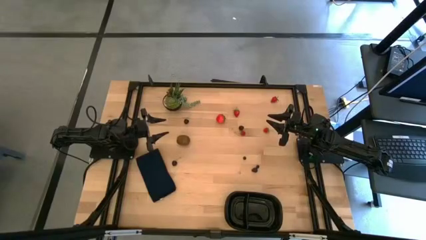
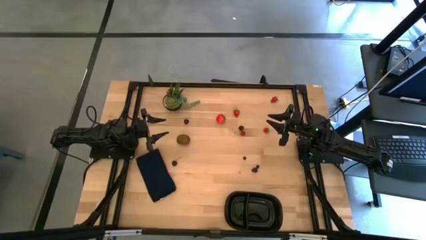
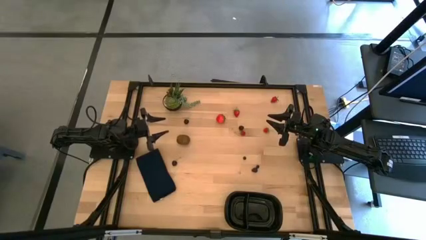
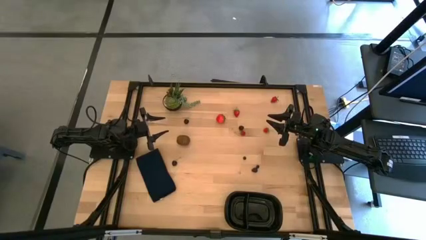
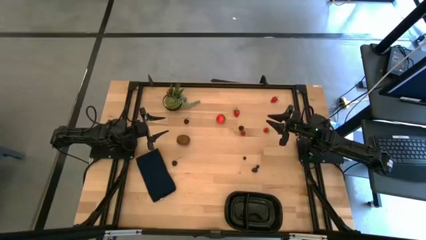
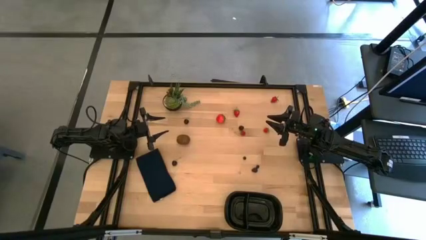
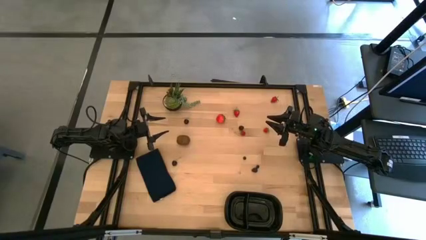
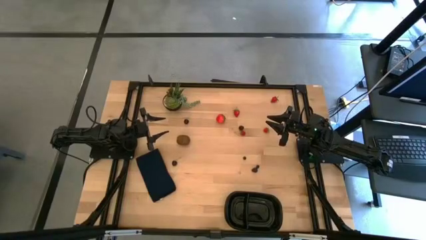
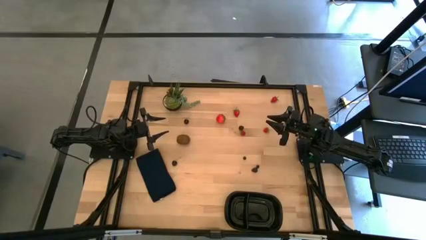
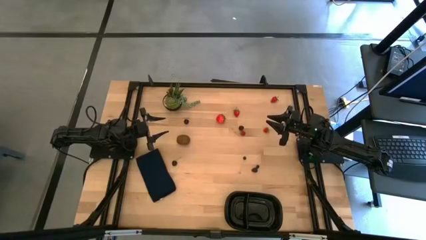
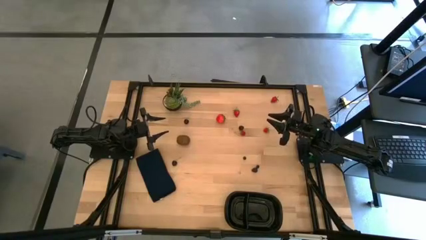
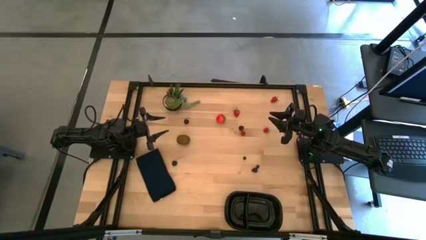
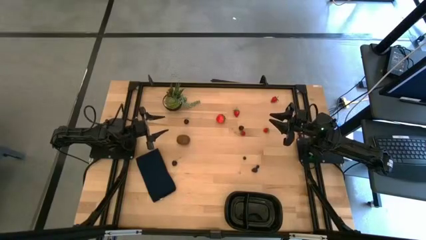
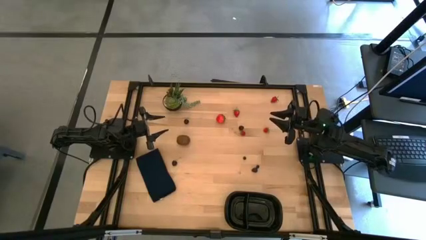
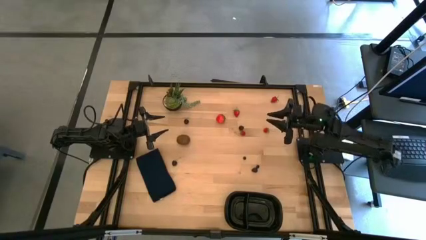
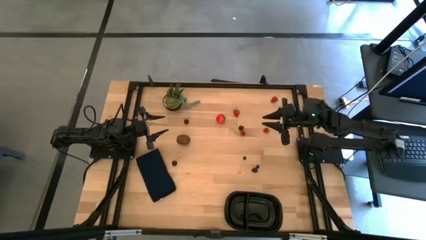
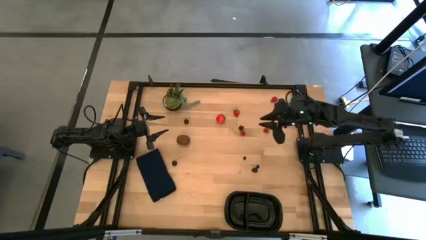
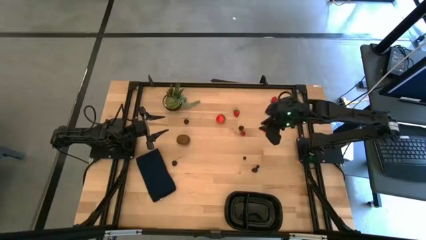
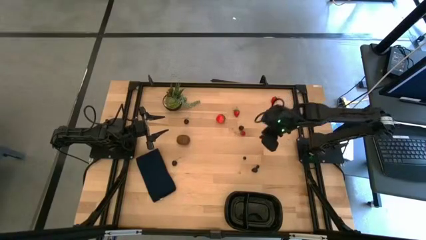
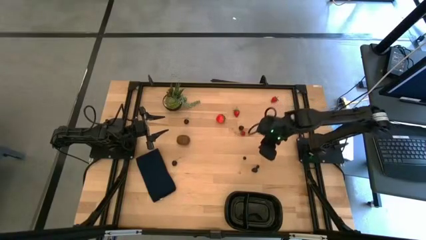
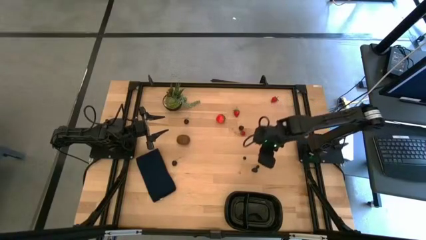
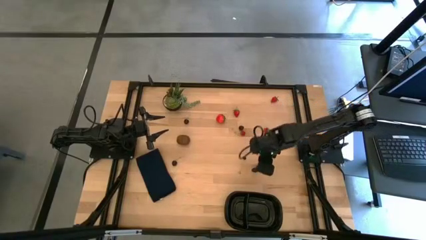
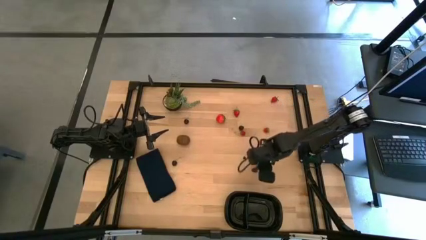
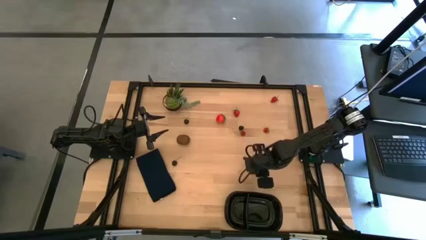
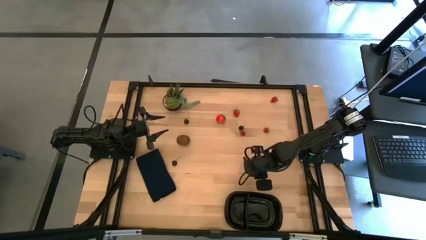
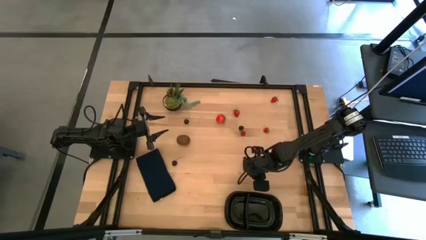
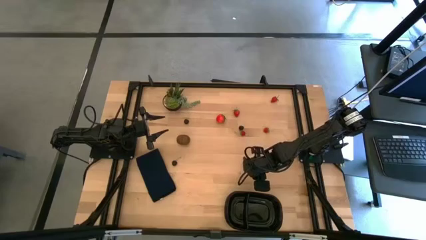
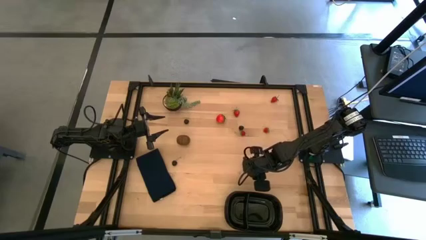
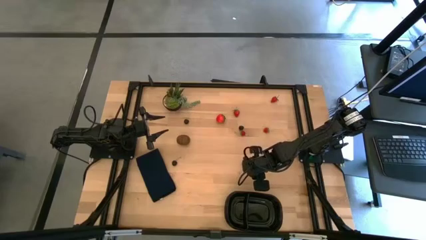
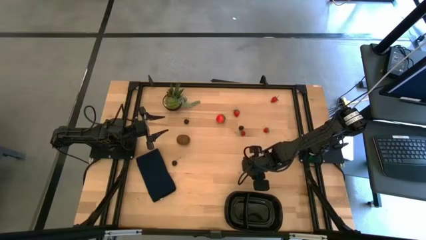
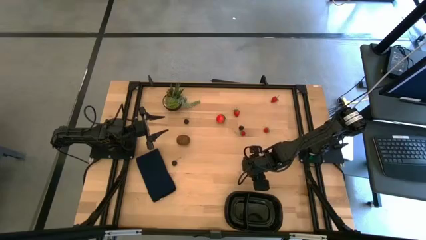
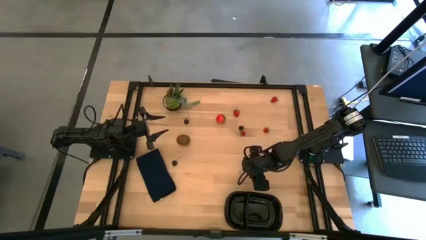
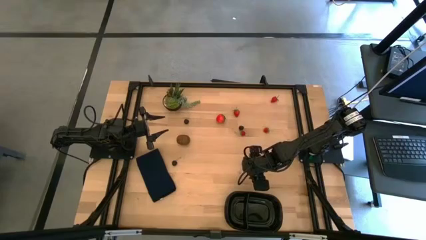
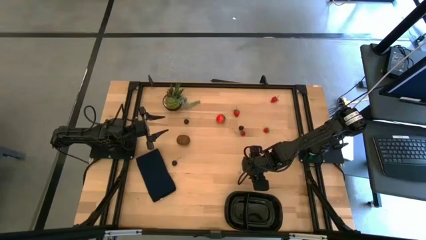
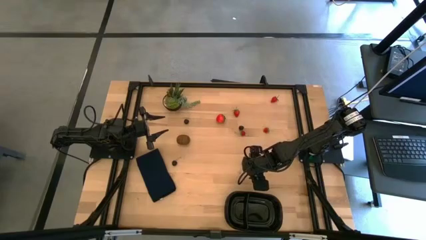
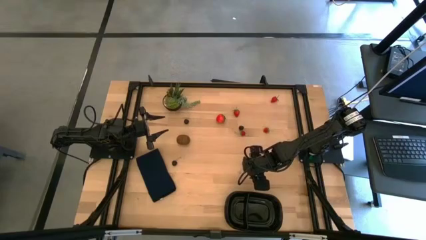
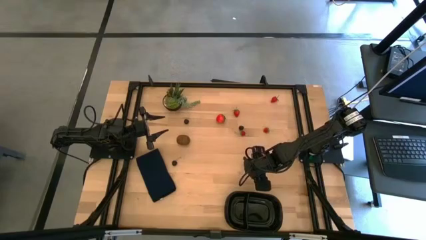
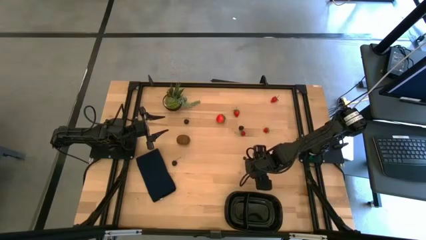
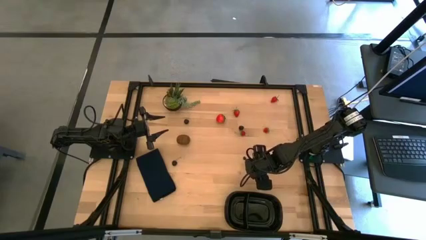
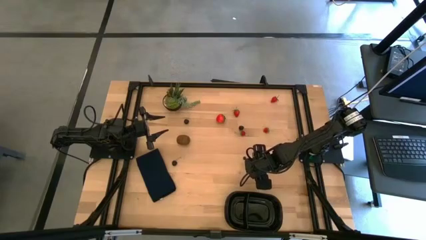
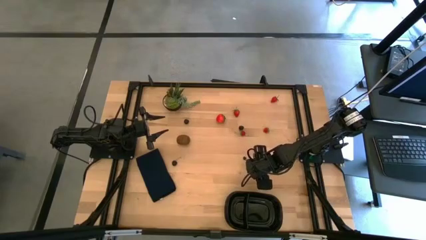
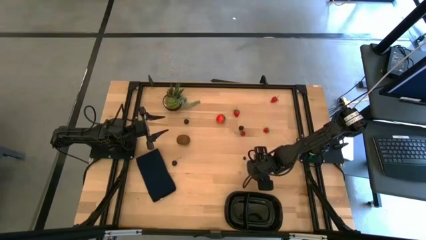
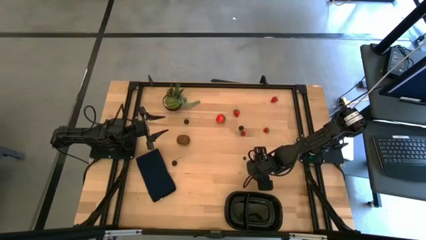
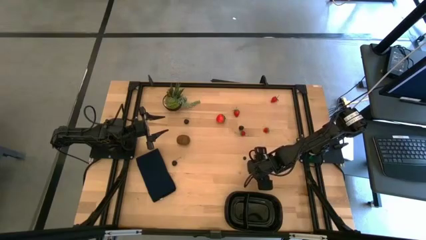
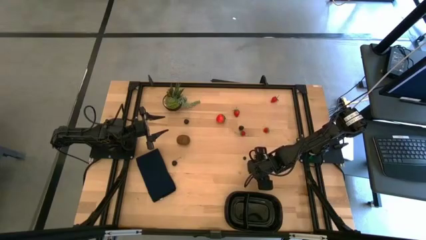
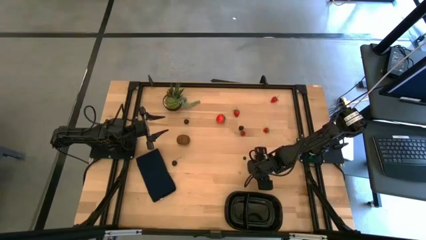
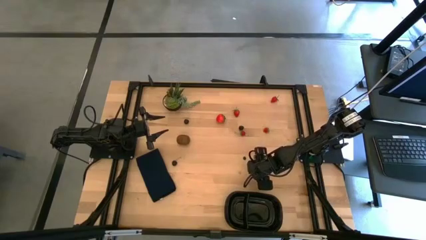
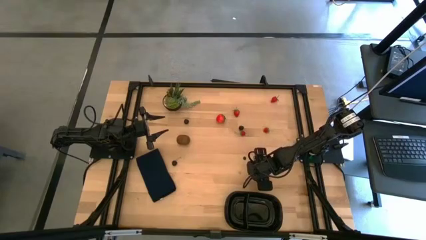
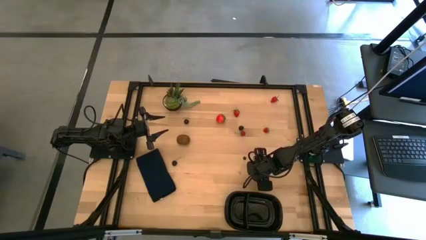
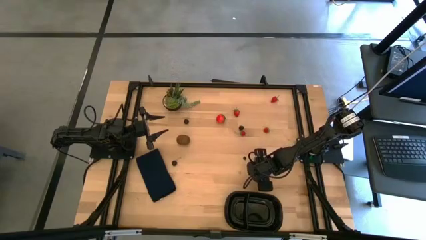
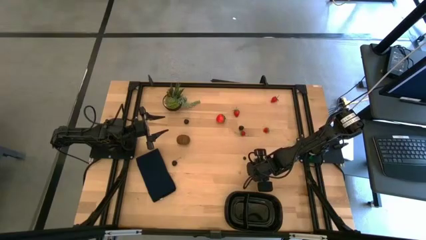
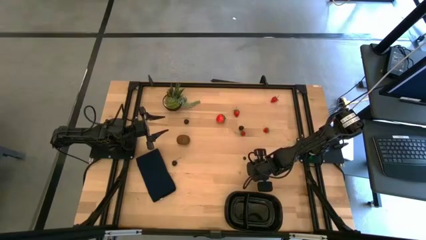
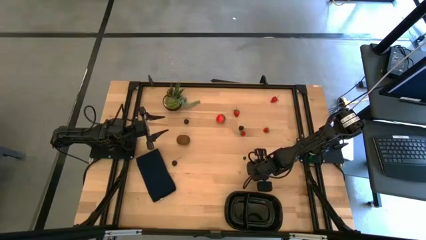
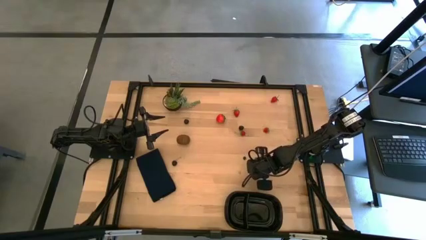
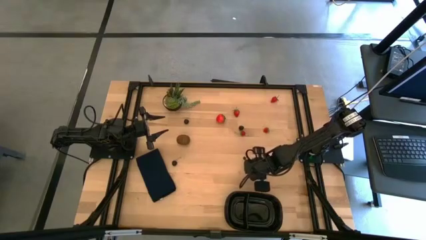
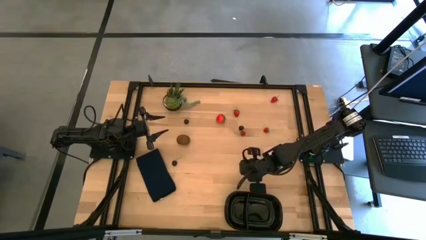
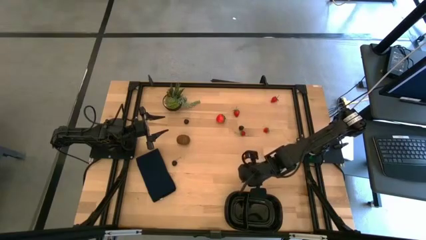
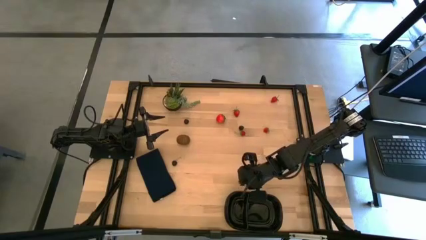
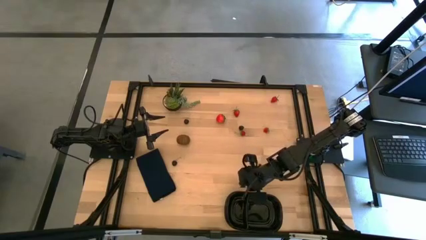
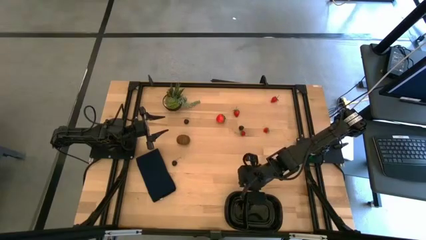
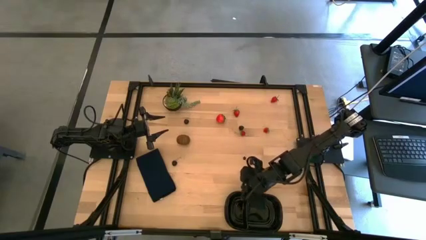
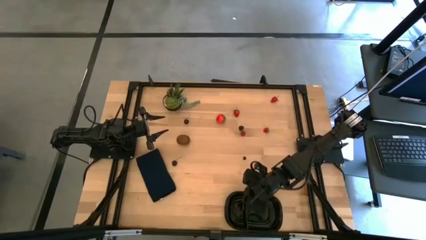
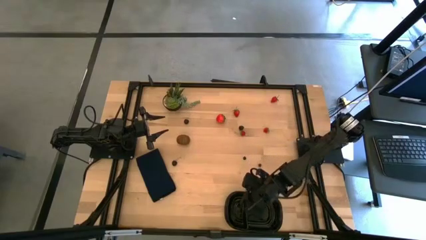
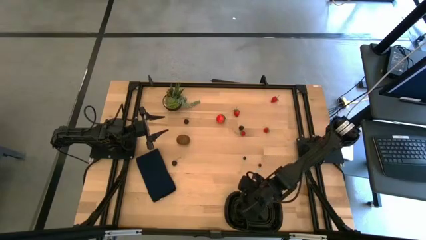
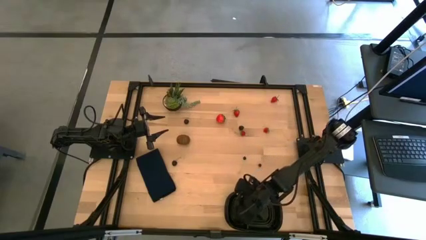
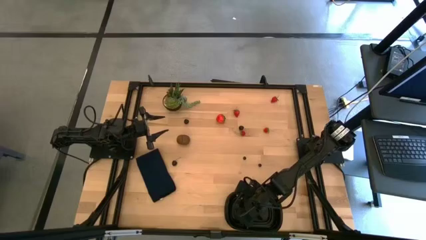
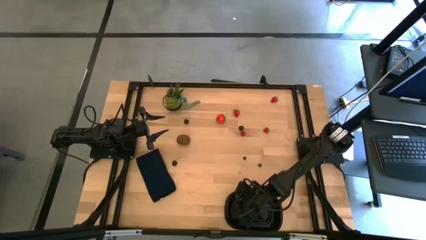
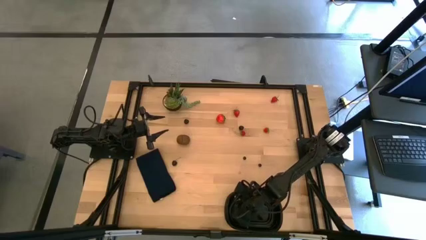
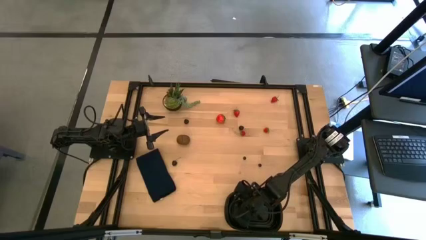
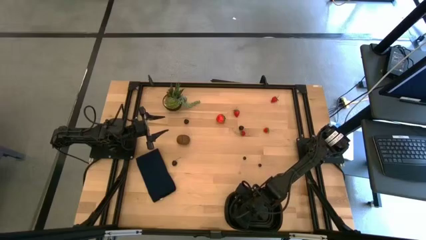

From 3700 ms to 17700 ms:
Task: Pick and placing Produce into tupperware
Put the blackberry into the black container
